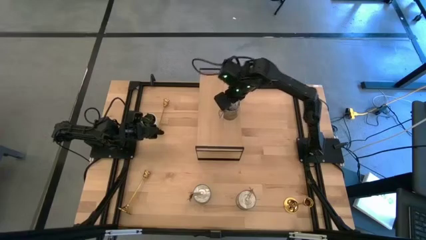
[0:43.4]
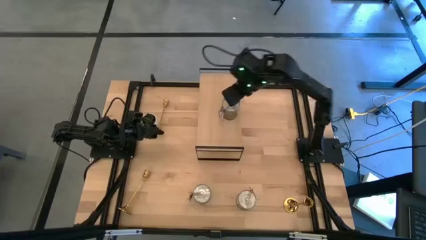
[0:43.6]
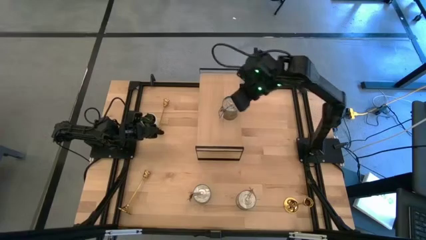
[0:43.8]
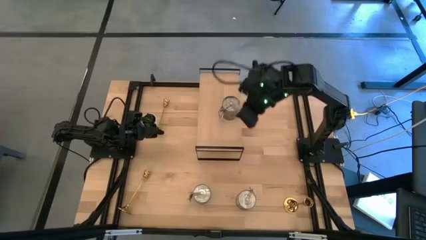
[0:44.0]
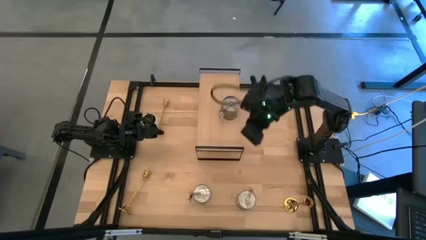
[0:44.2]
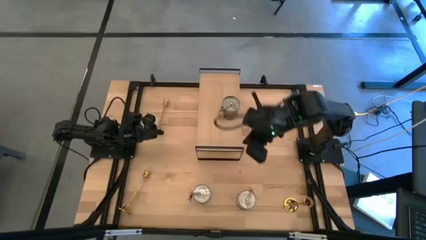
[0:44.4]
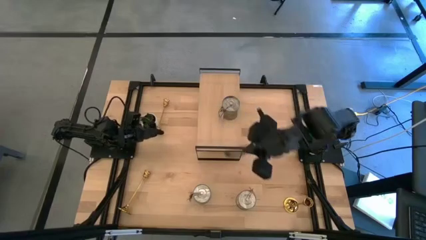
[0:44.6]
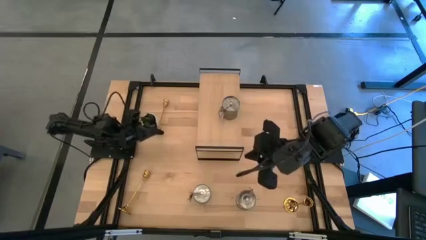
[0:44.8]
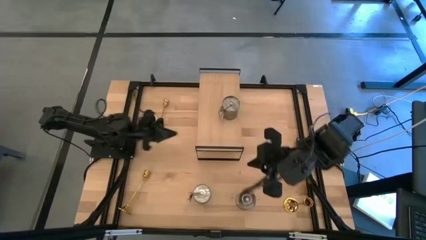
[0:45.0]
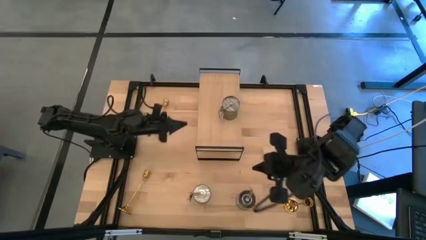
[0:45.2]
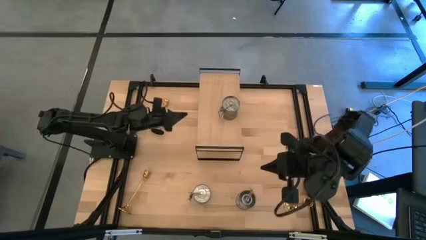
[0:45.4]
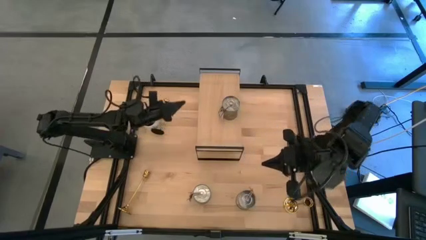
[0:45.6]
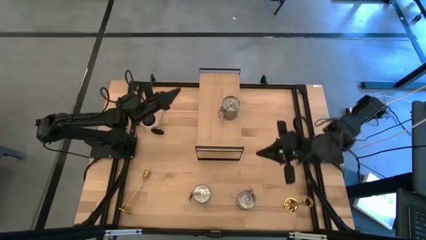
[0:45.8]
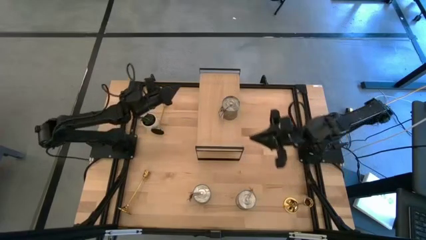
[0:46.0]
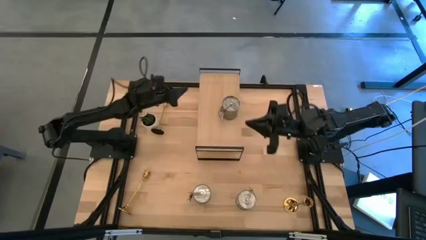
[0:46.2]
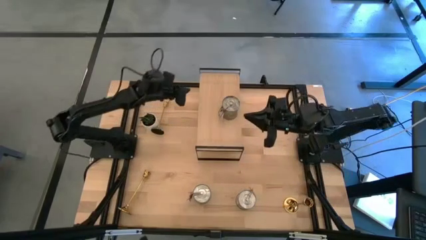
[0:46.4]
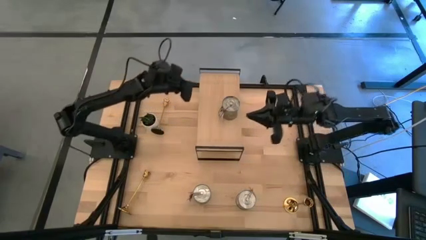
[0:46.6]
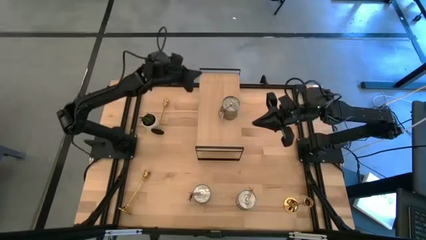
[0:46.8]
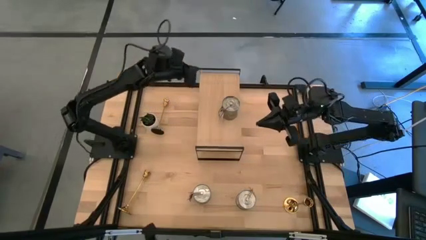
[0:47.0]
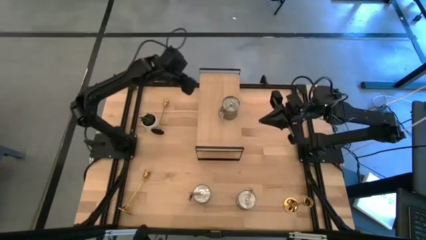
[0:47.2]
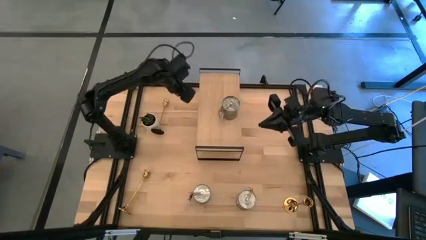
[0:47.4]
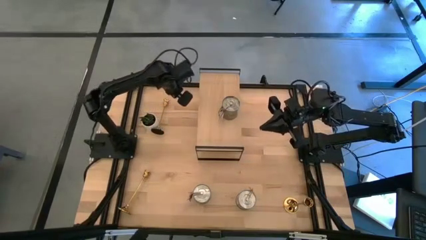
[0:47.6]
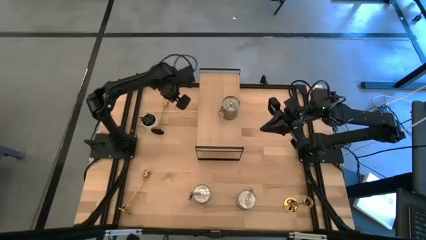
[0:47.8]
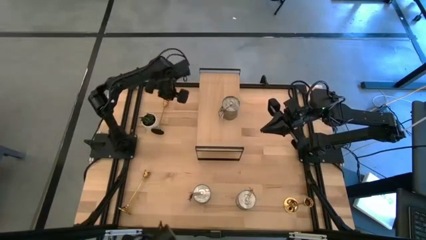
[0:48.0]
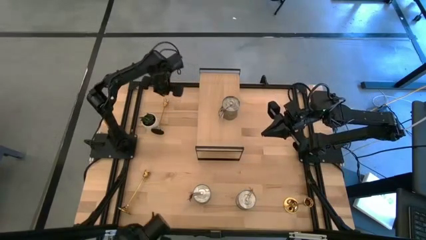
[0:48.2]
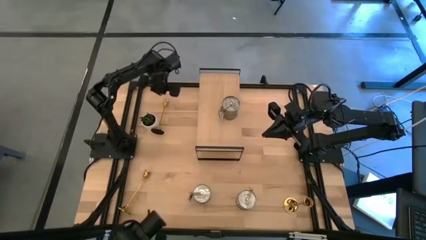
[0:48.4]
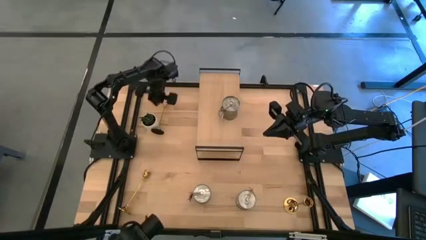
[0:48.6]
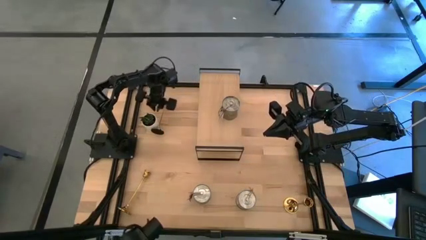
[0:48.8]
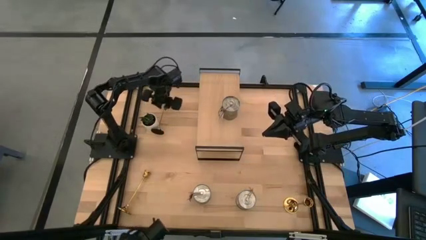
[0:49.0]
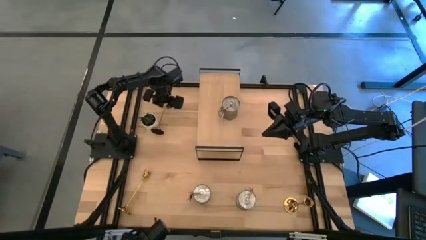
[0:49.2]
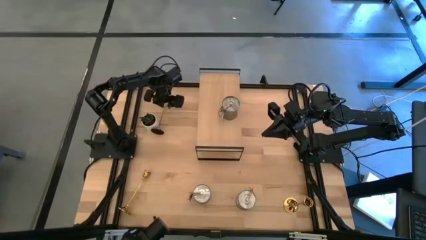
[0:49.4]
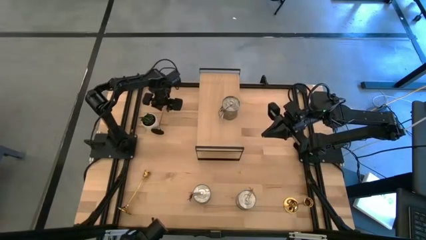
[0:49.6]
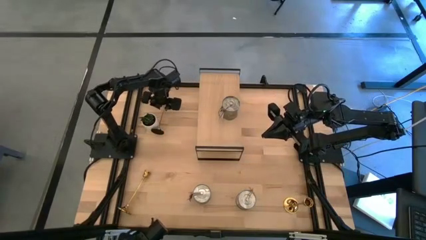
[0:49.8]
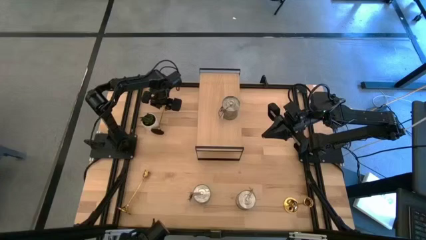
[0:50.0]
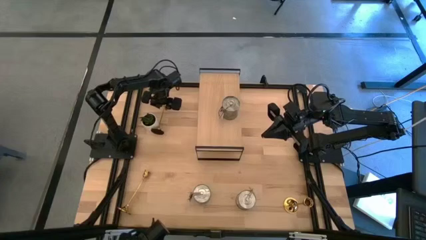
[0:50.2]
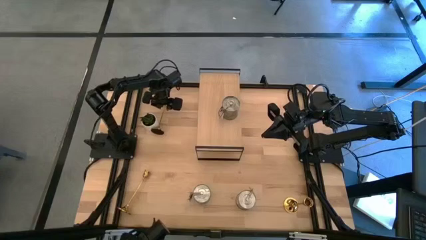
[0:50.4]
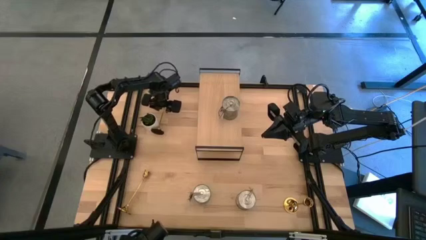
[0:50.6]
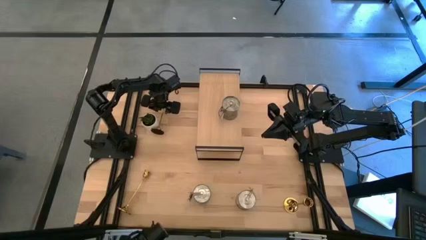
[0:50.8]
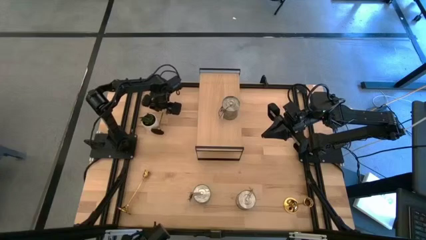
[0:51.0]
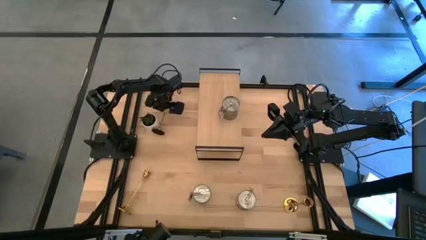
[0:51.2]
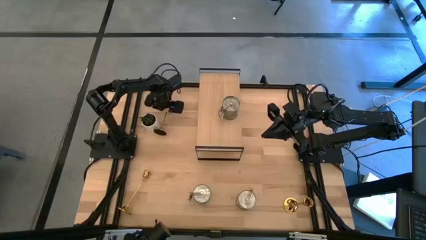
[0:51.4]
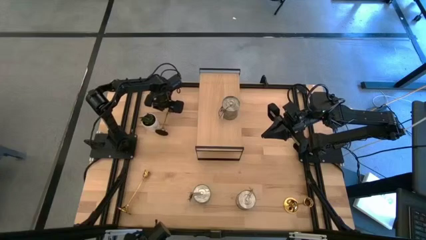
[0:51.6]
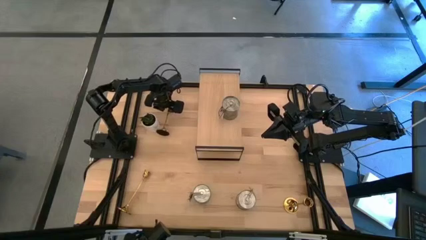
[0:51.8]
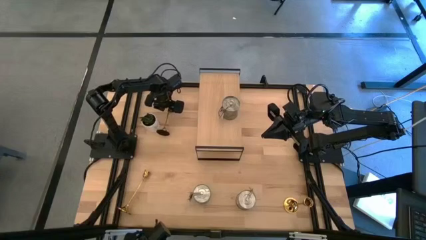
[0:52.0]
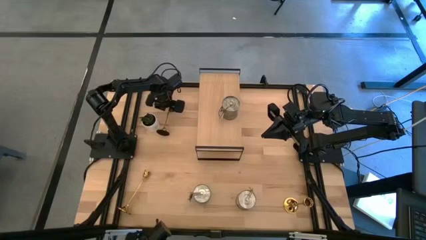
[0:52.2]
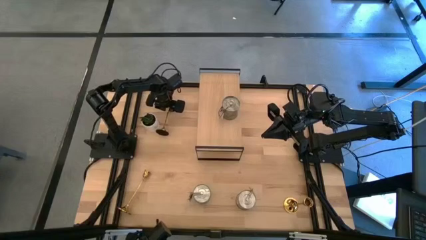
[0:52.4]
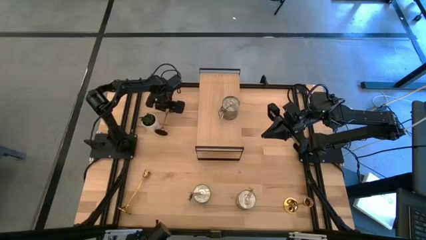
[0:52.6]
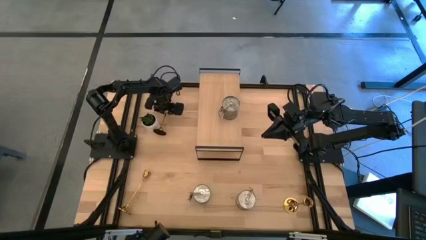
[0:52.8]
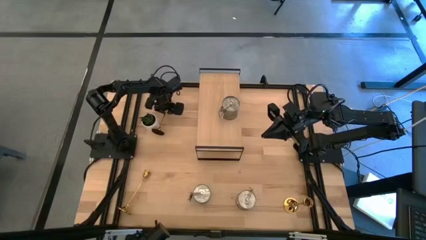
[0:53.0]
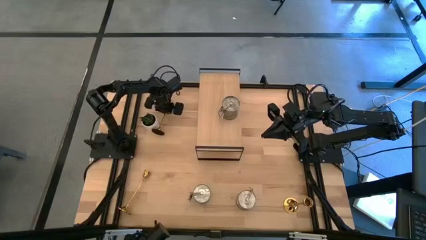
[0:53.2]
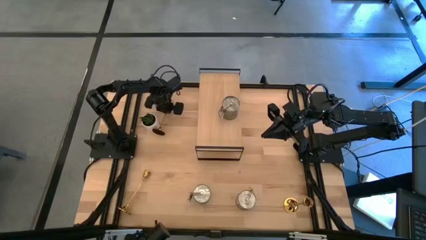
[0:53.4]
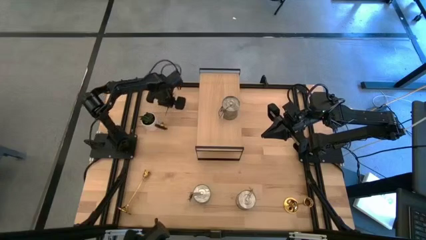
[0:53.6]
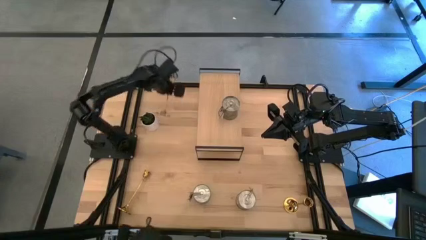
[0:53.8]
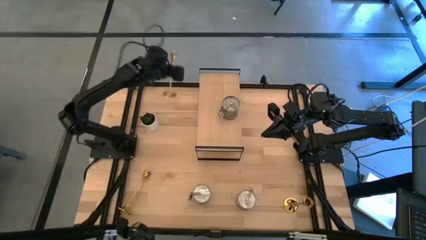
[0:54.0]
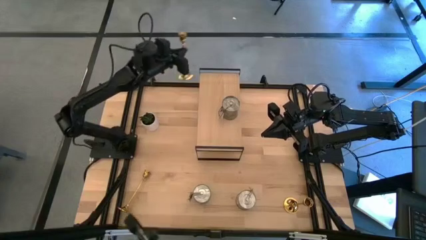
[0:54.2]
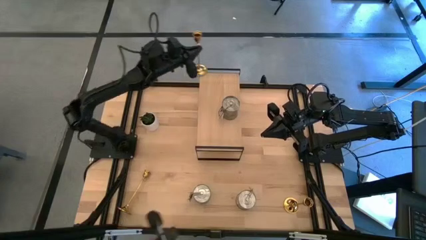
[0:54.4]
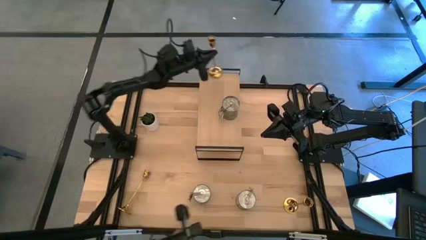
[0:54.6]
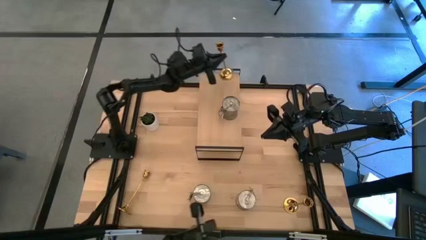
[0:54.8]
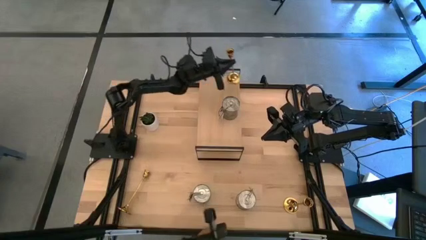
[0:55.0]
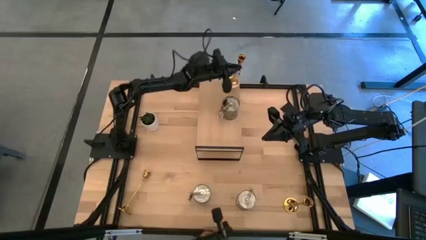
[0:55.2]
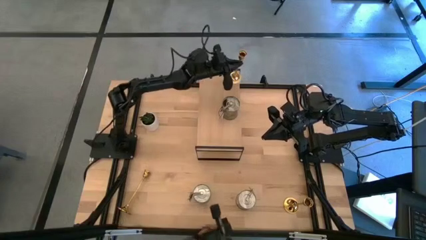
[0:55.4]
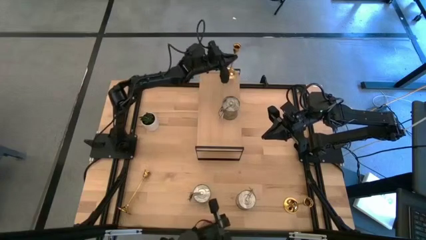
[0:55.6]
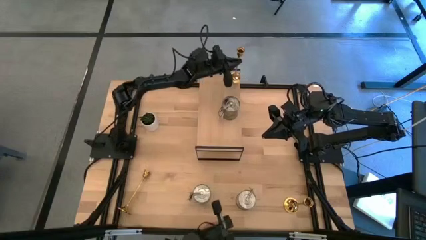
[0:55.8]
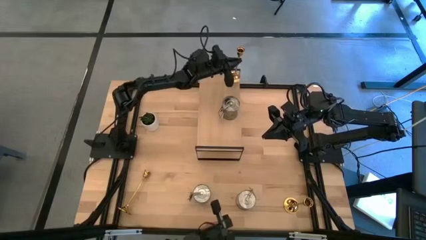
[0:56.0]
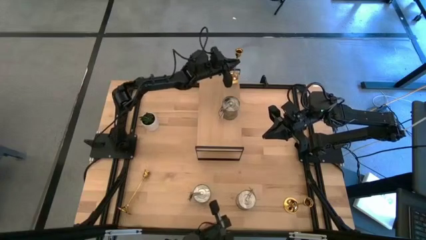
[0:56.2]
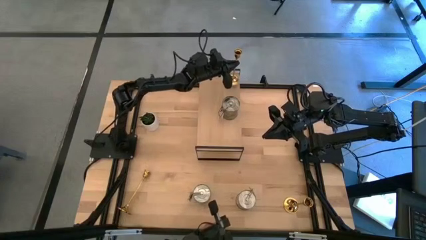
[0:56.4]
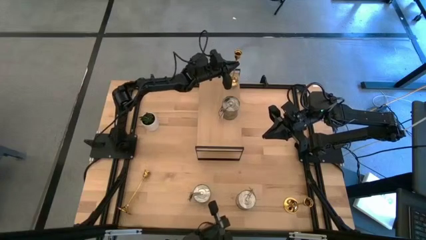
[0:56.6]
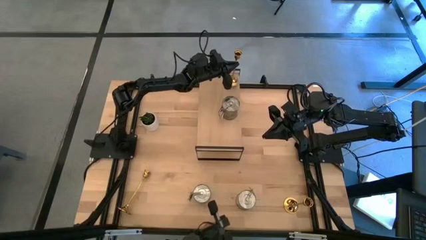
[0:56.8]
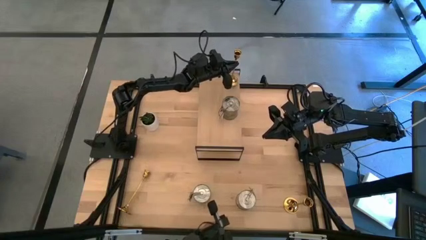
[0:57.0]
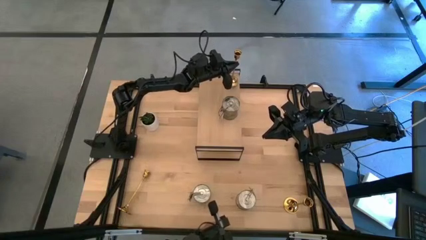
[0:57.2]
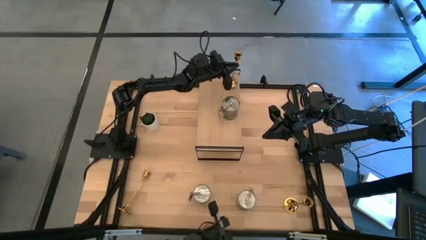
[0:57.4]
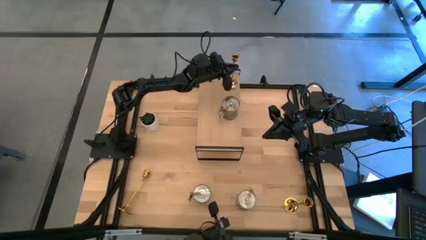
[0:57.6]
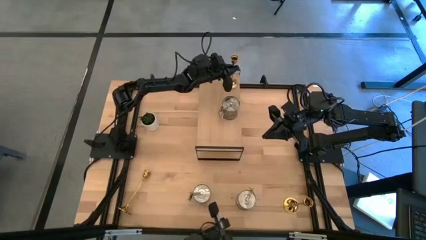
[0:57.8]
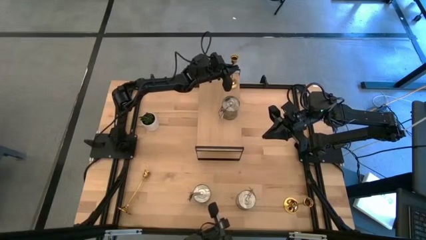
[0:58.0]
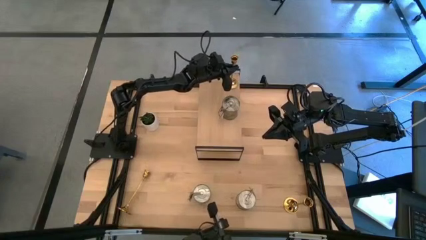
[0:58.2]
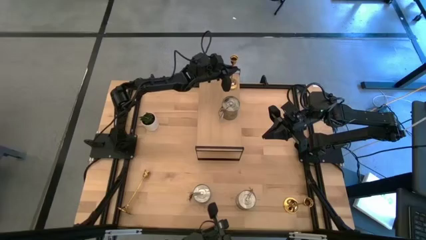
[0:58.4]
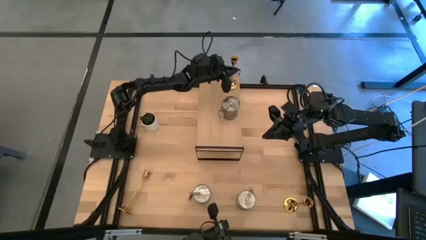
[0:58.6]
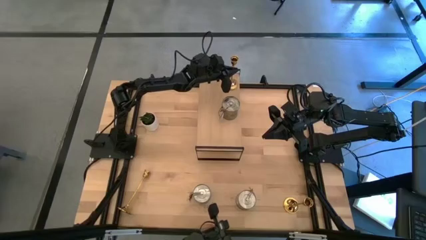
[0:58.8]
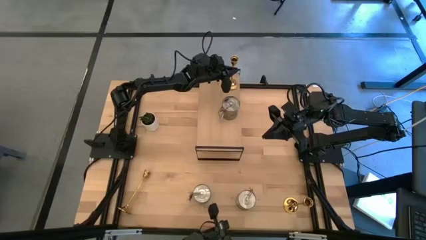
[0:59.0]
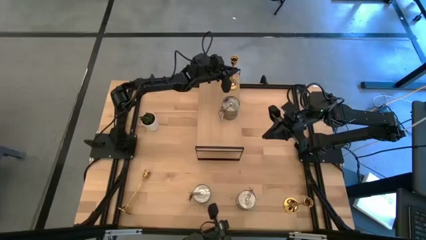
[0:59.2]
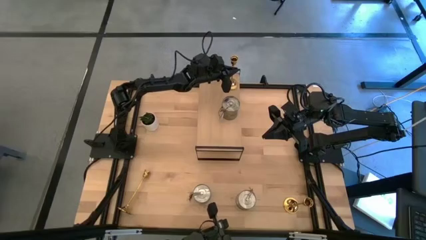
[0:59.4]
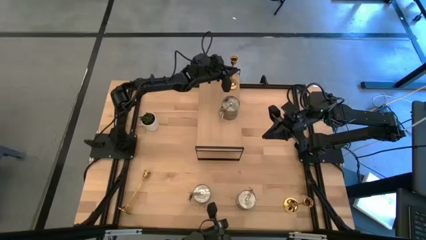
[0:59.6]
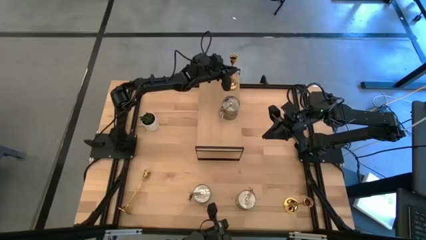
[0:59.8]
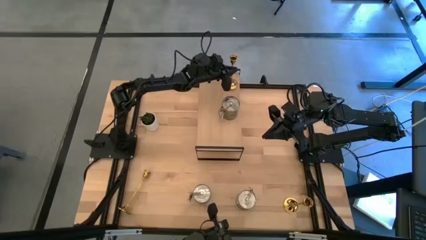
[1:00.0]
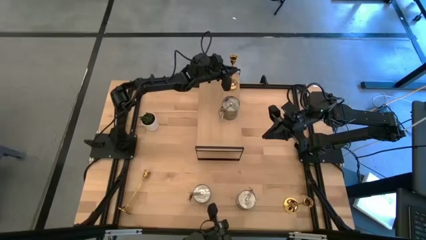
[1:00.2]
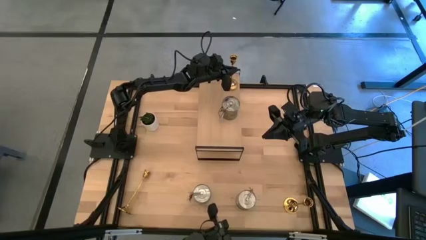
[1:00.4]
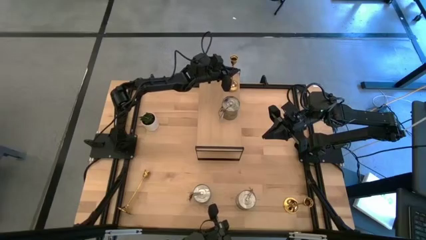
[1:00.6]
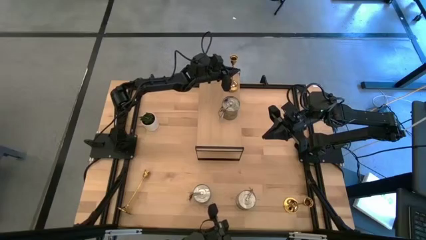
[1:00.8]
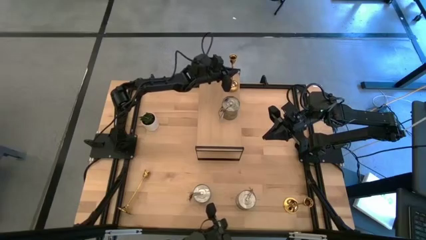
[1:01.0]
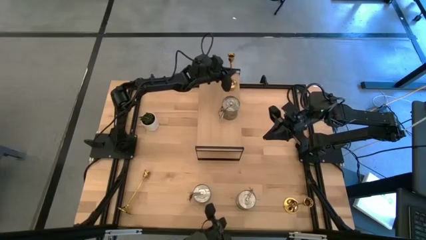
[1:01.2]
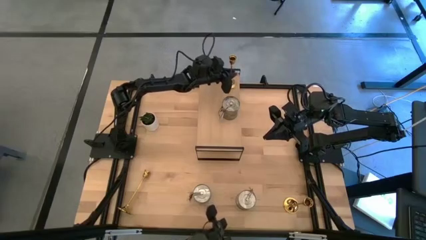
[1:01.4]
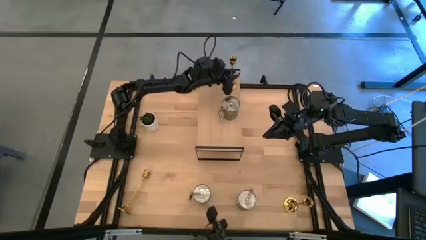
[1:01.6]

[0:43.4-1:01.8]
Task: Pick & Place candle stick holders
Put the top gold candle holder on the shelf
